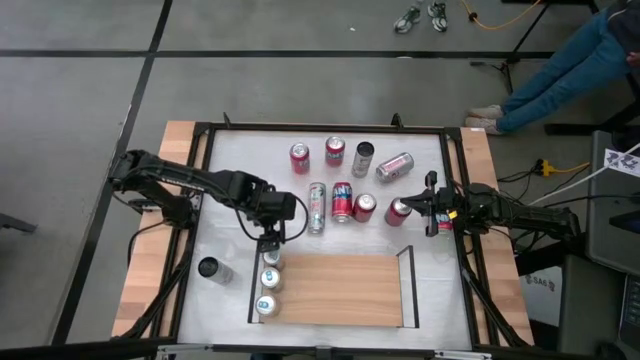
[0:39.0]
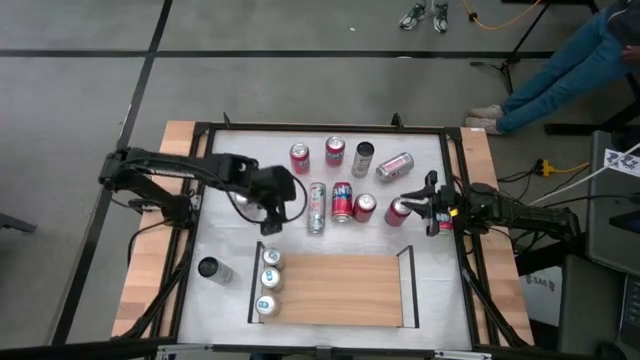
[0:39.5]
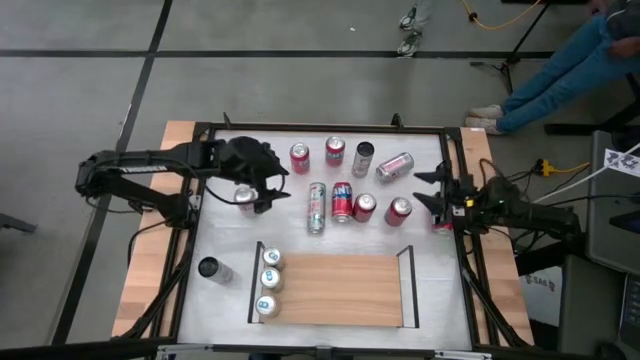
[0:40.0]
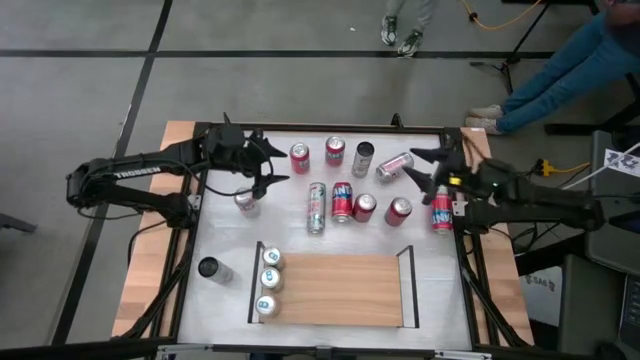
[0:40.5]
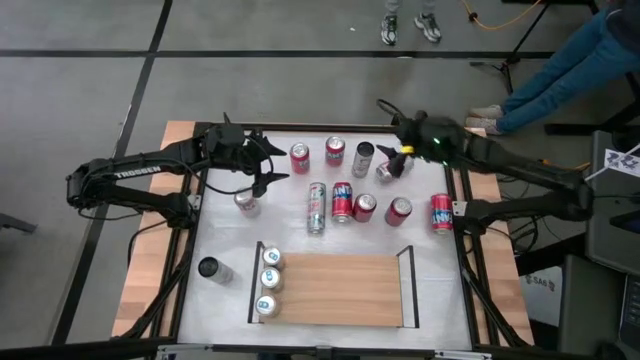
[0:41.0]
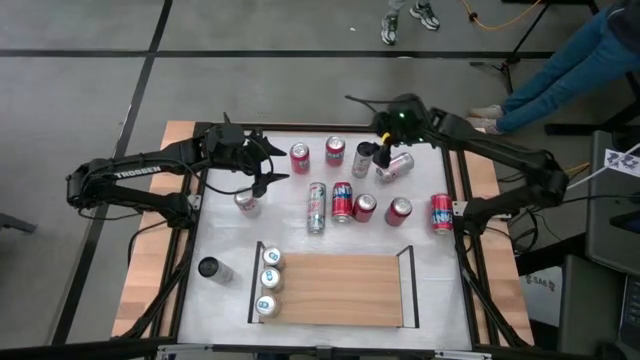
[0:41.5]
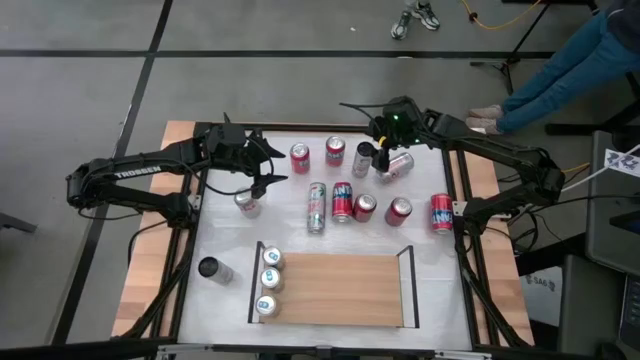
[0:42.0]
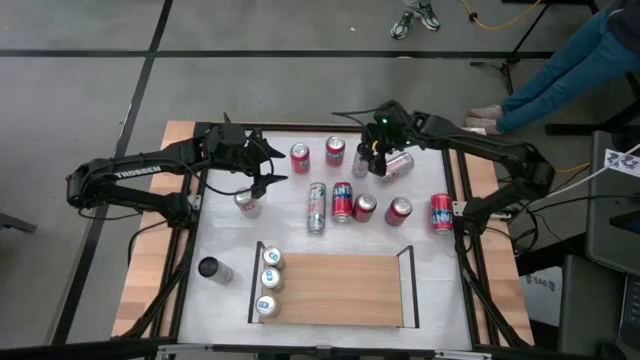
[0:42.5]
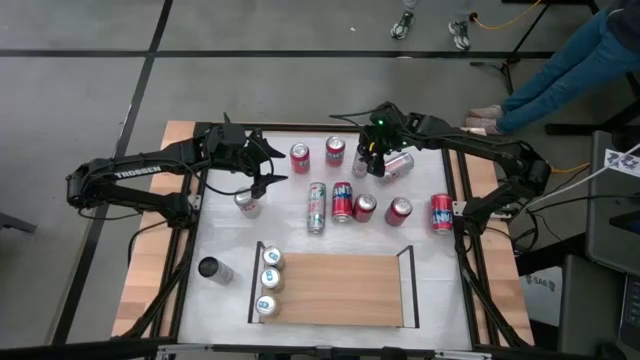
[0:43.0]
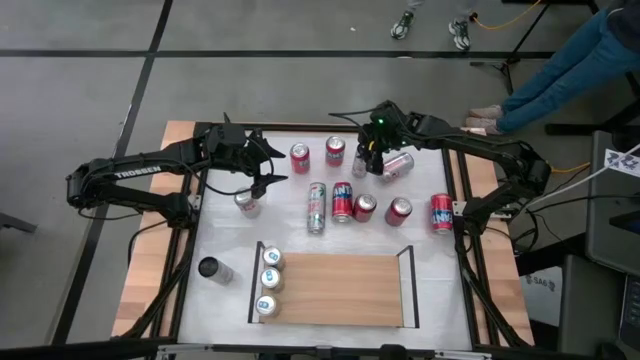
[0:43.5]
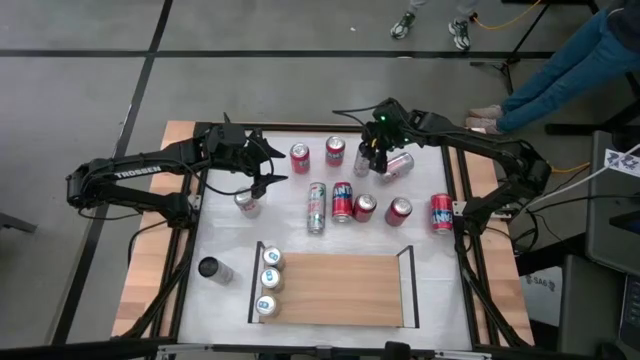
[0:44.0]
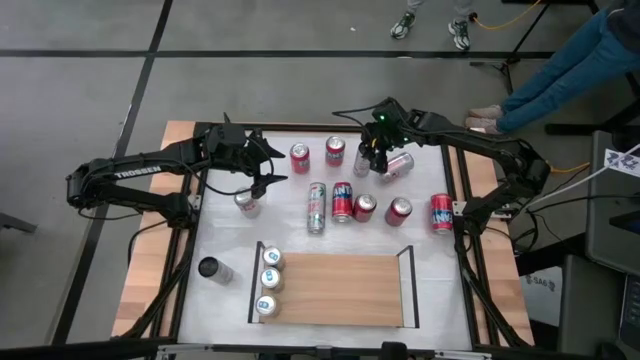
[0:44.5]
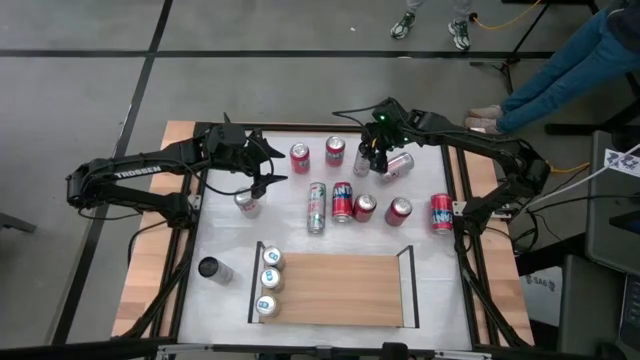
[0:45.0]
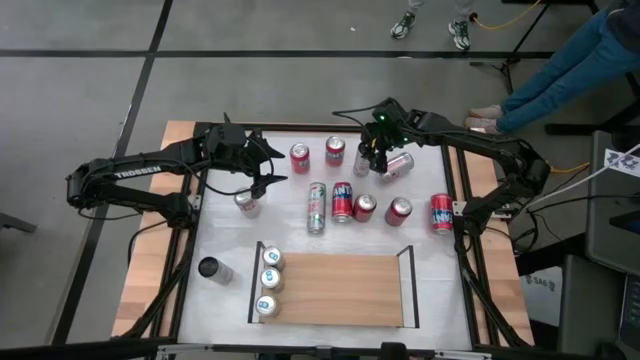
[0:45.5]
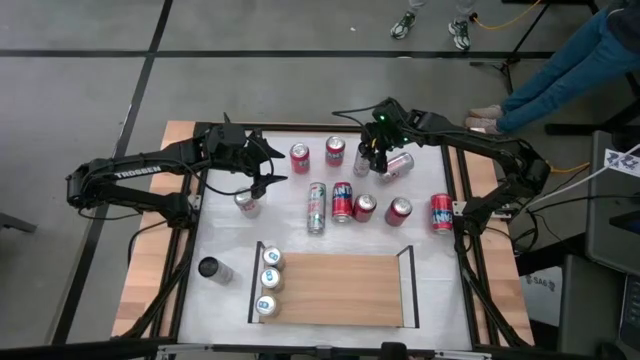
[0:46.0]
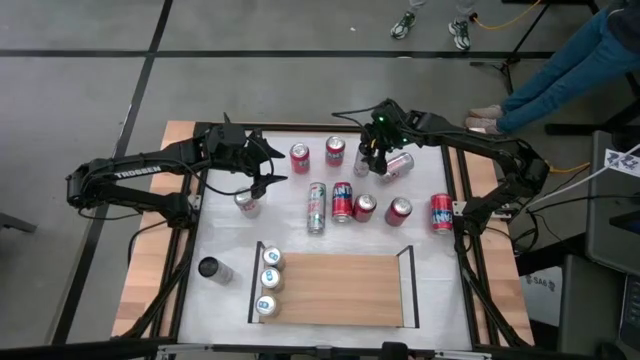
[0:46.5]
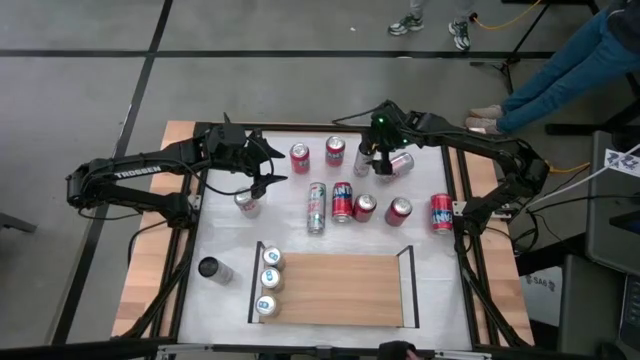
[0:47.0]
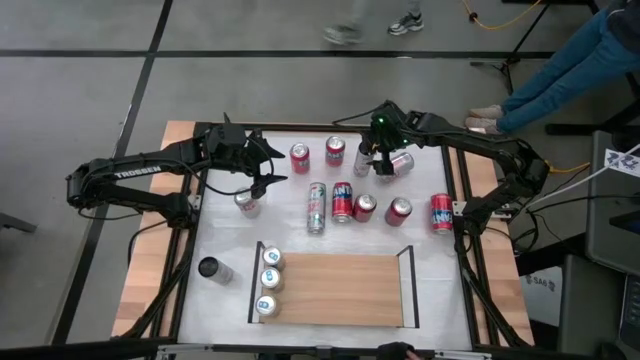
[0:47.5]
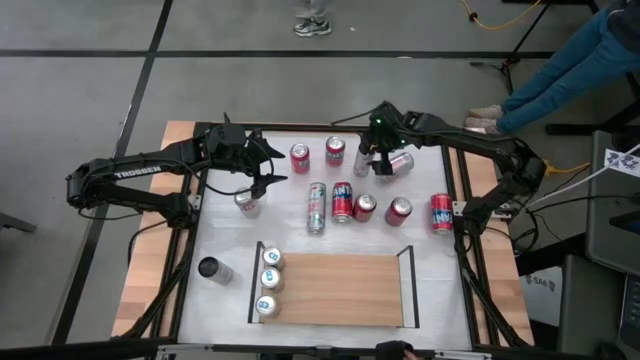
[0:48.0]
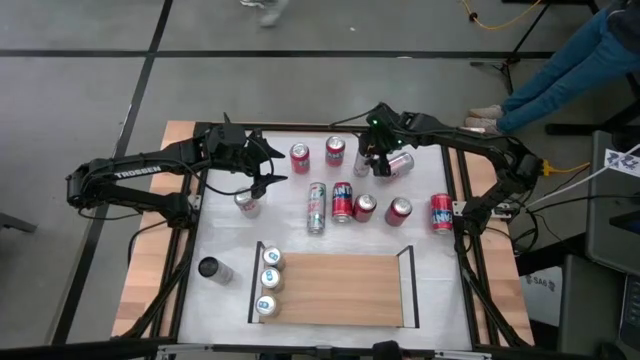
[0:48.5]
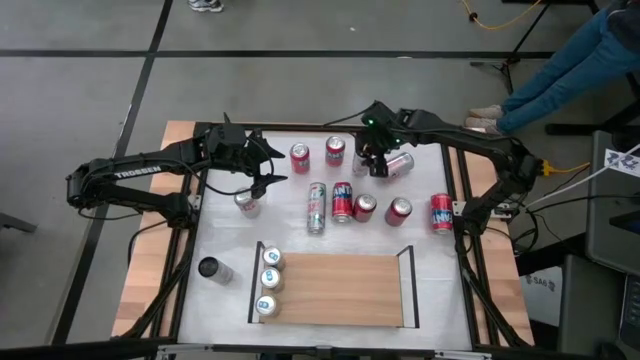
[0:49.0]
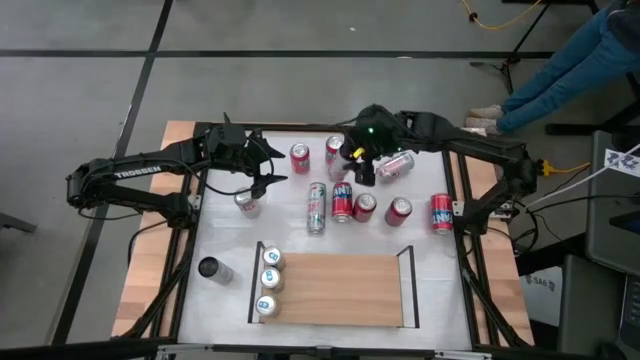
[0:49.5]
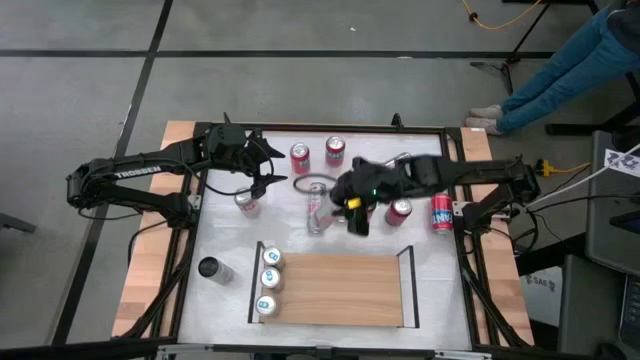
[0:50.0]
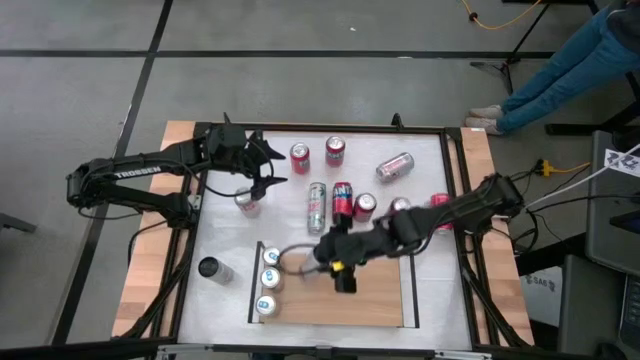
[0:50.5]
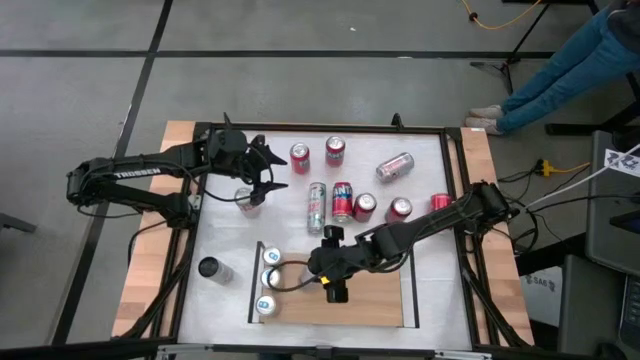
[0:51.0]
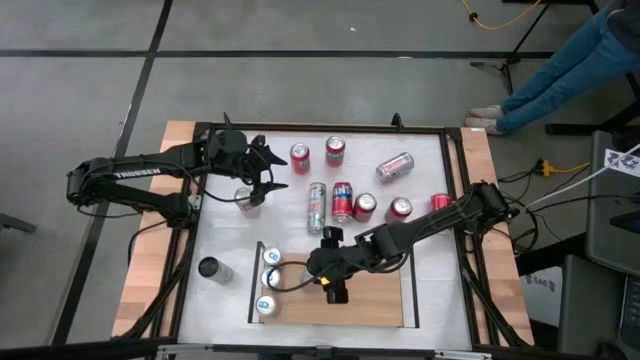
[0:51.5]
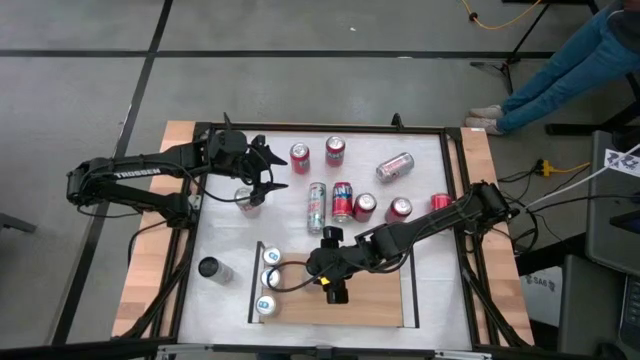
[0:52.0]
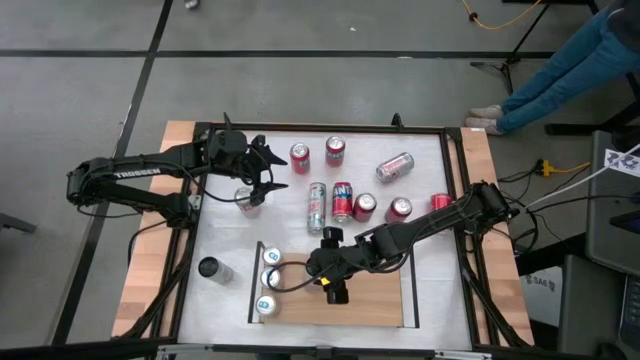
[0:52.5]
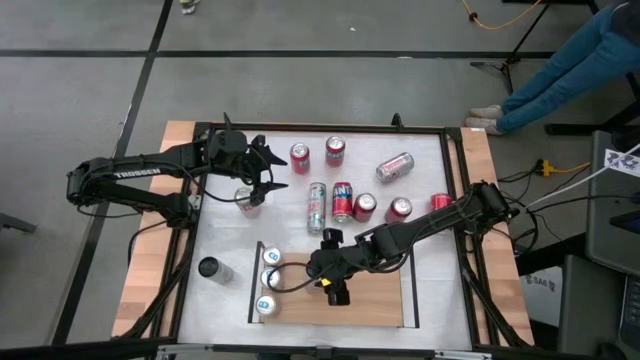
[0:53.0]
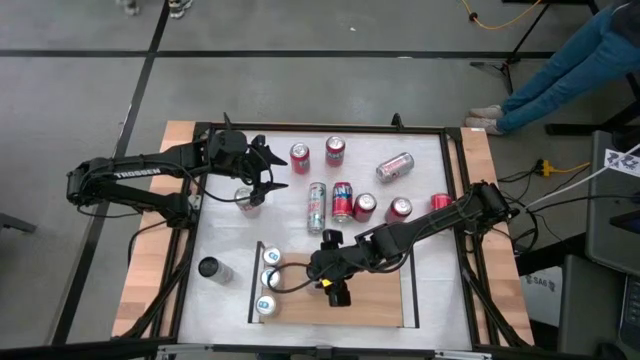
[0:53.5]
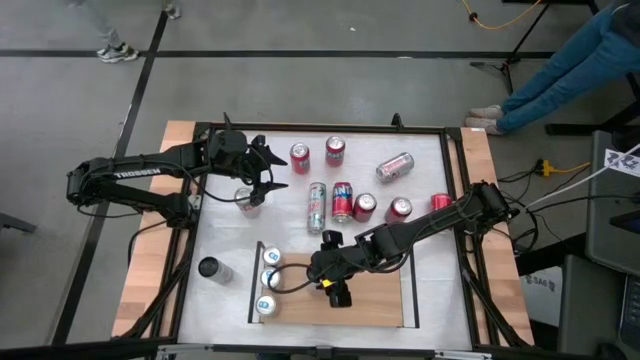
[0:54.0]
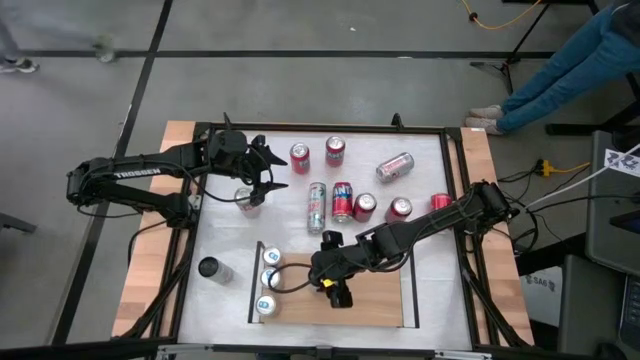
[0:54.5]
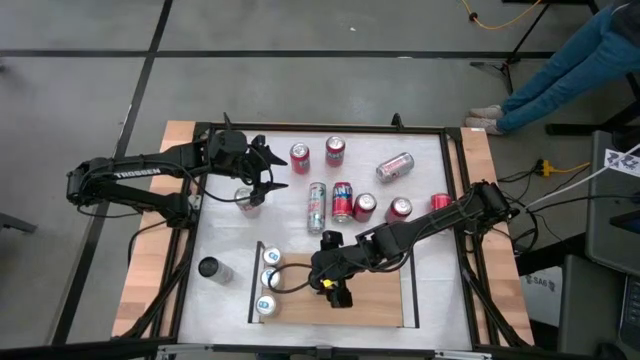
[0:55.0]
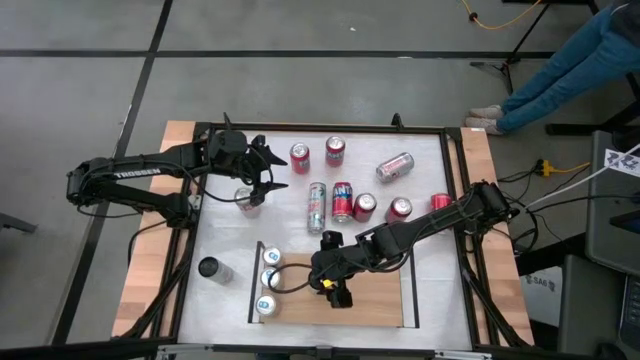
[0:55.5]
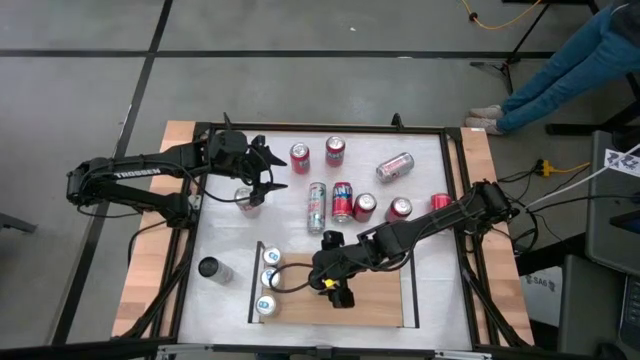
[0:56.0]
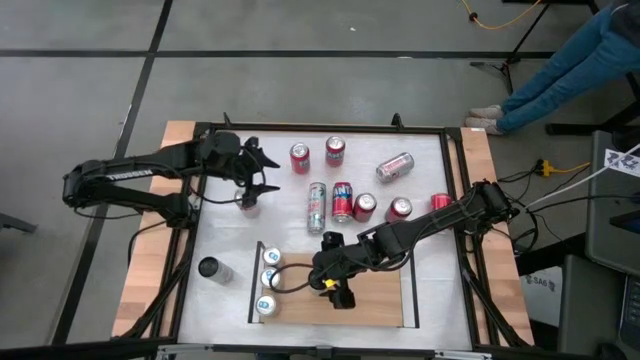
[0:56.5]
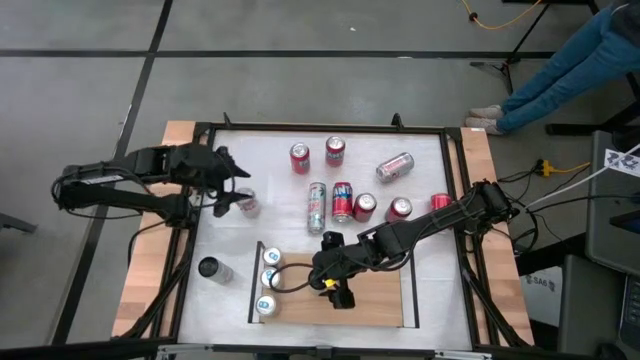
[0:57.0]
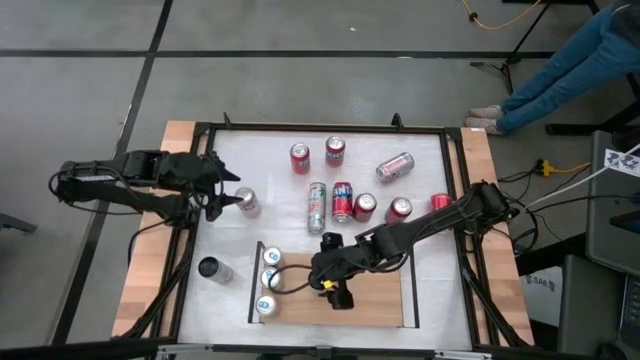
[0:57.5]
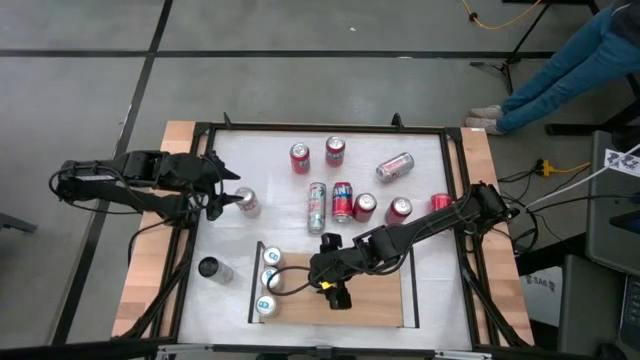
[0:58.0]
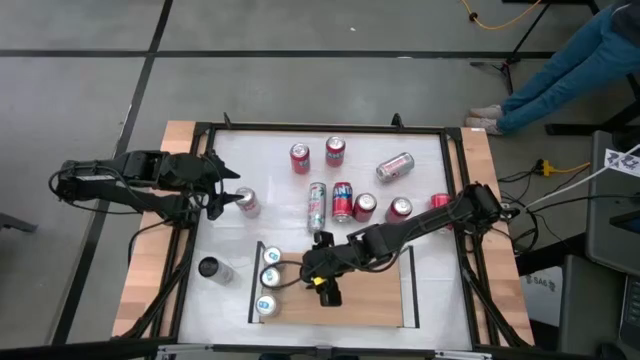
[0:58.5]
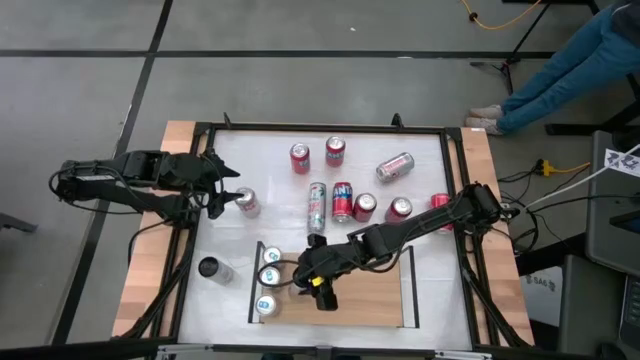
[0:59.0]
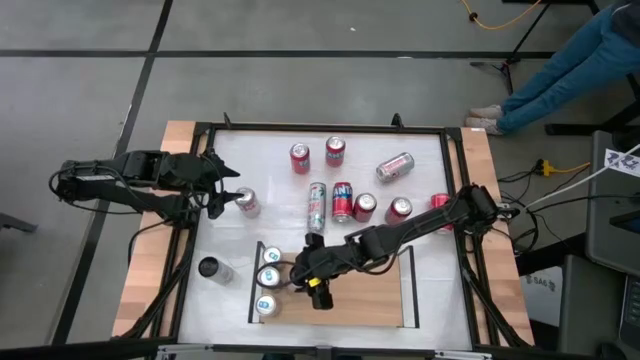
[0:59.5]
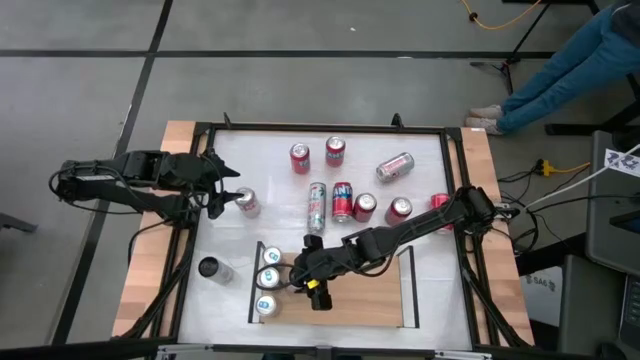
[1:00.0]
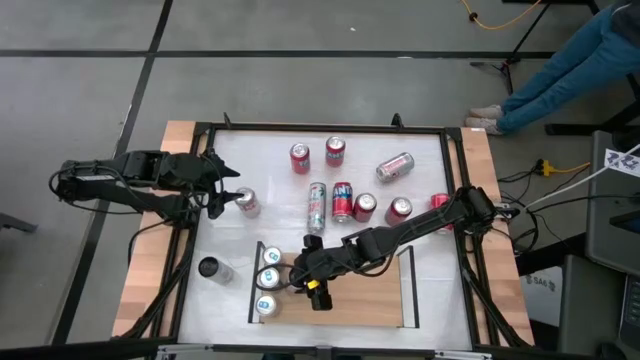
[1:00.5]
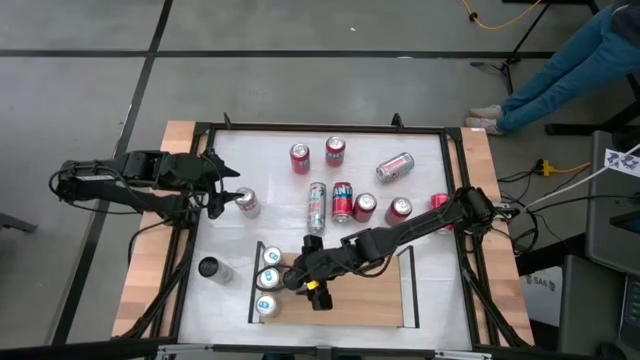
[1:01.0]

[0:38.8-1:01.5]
Task: Place canned beverage on shelf
Put the top white soda can on the shelf
